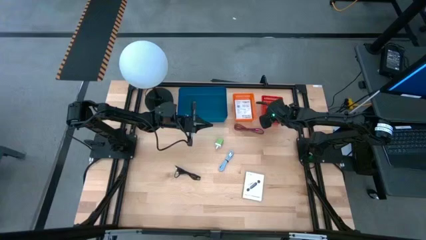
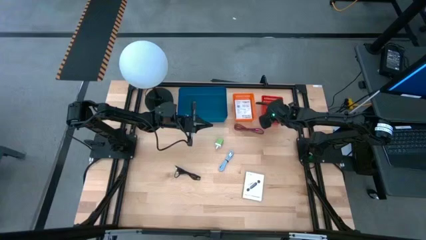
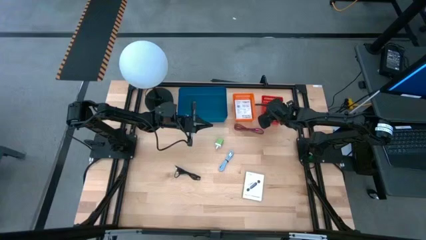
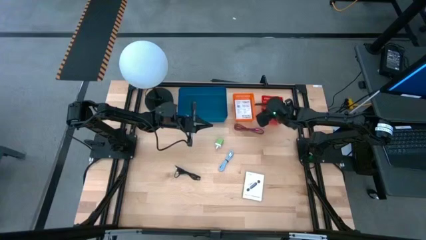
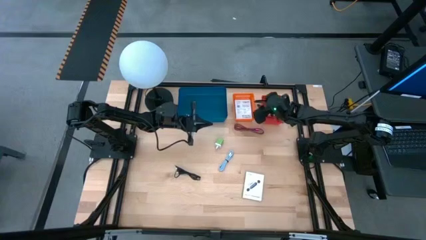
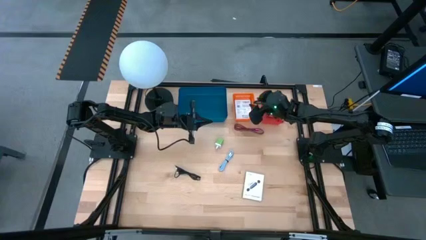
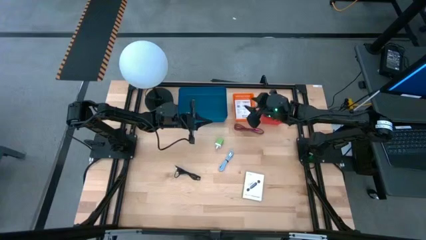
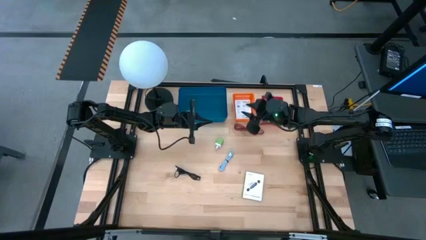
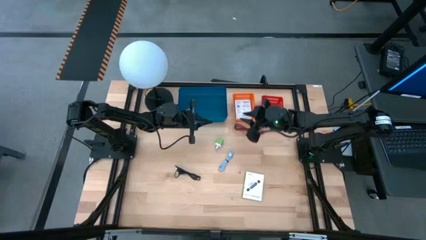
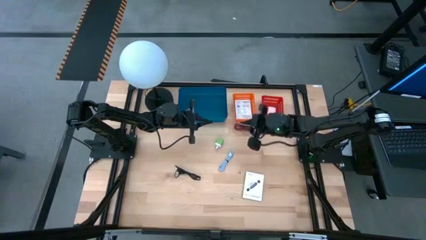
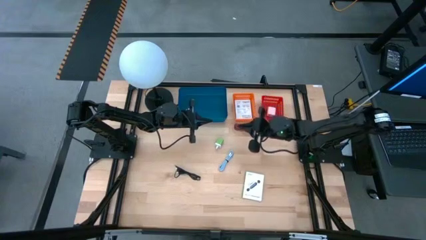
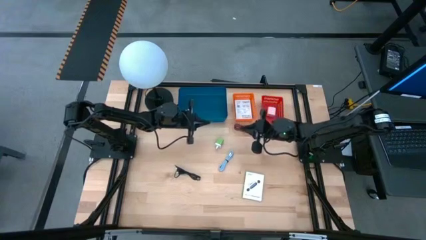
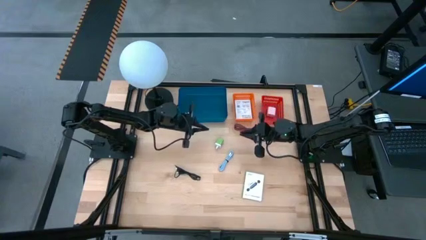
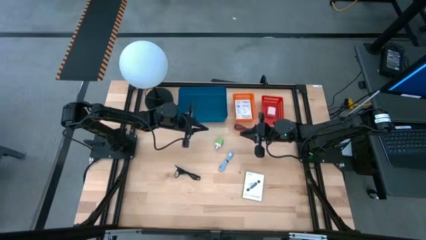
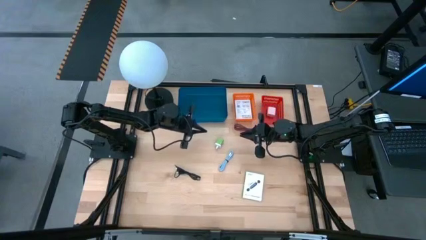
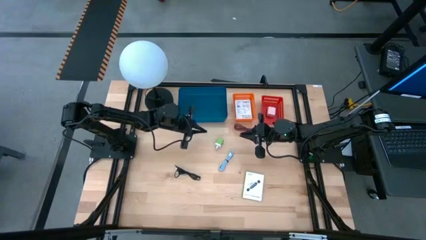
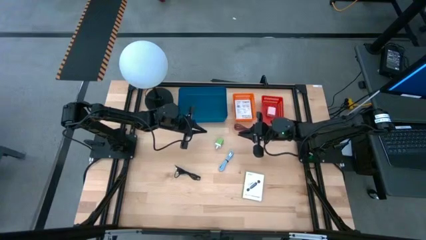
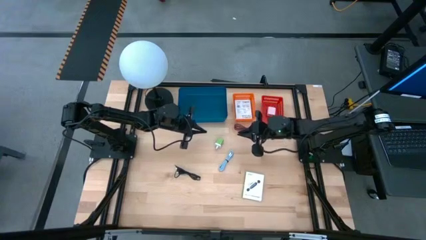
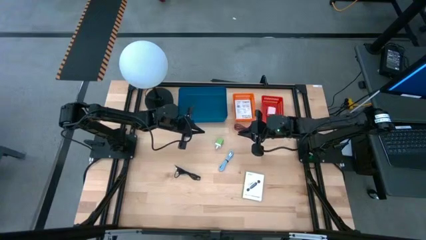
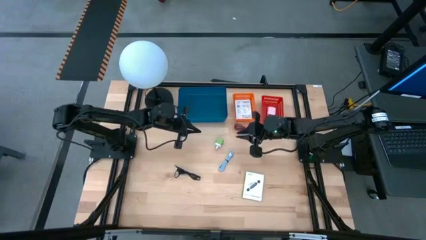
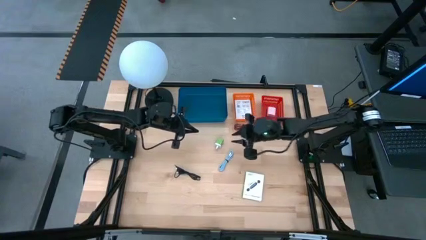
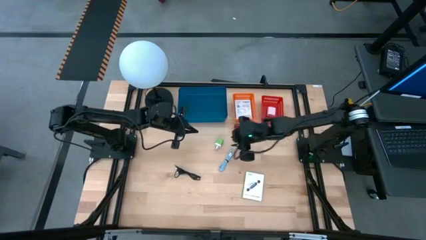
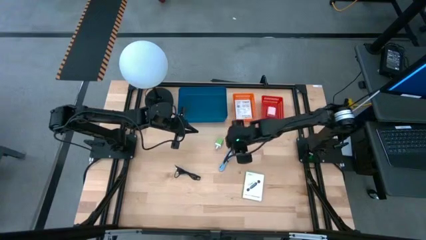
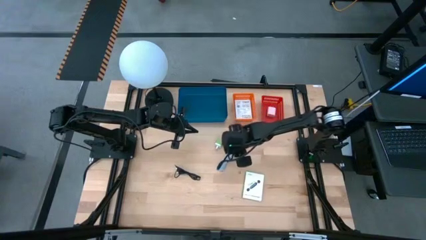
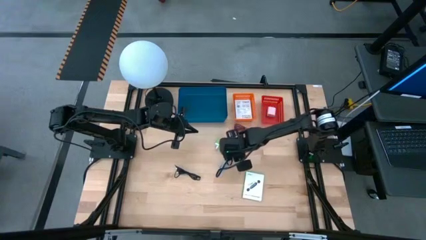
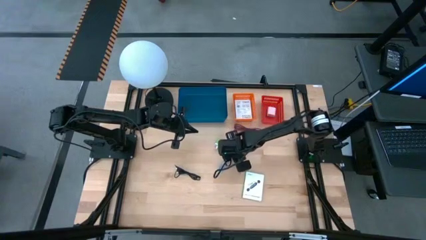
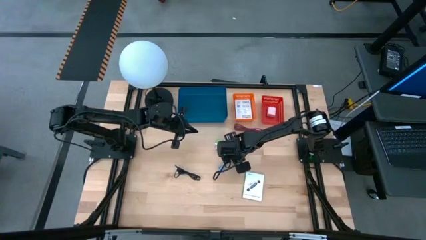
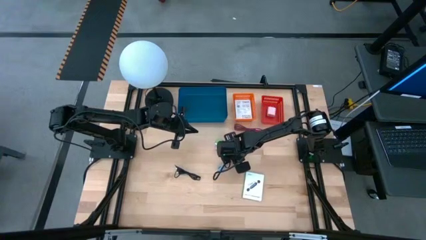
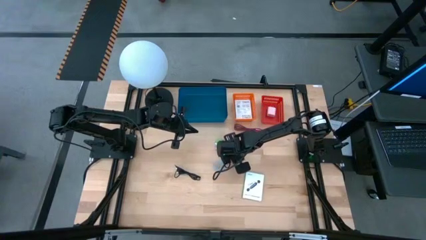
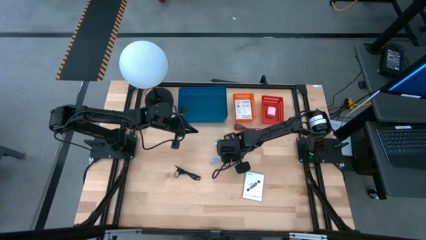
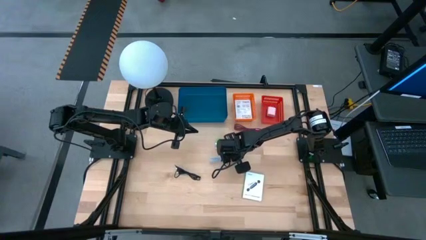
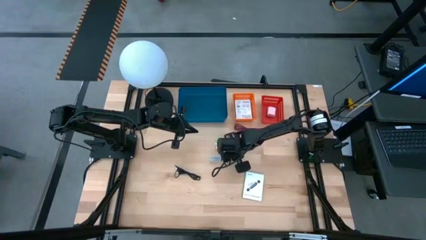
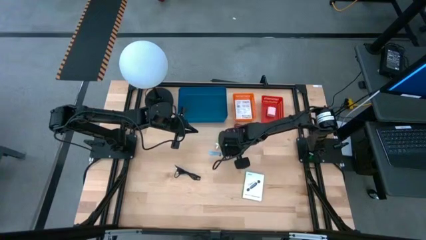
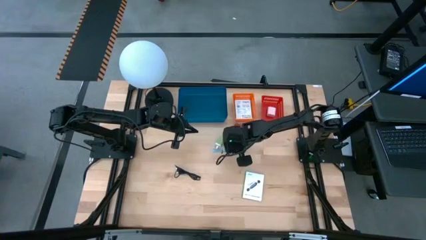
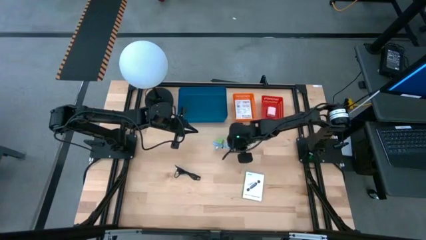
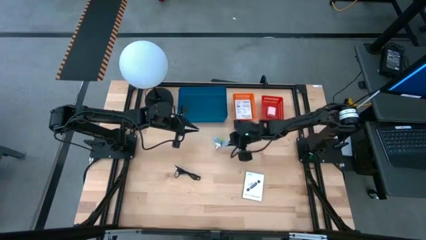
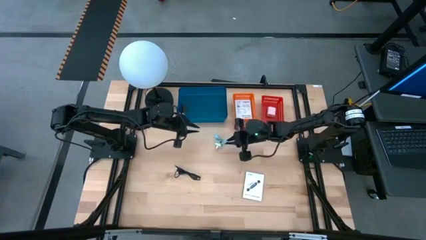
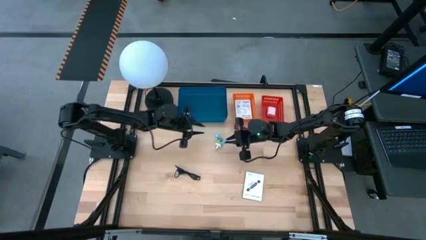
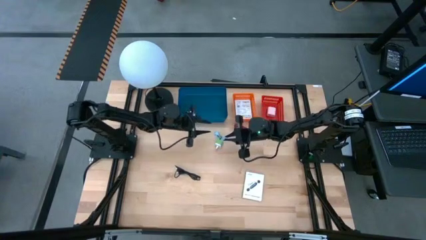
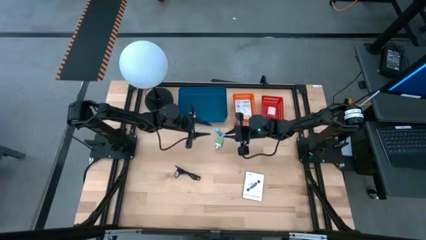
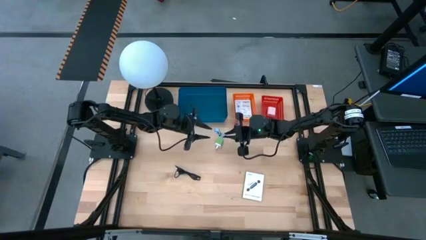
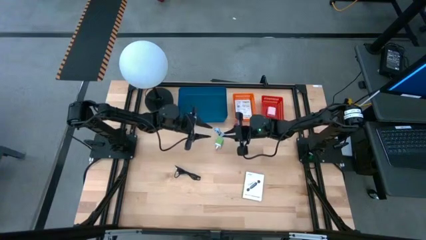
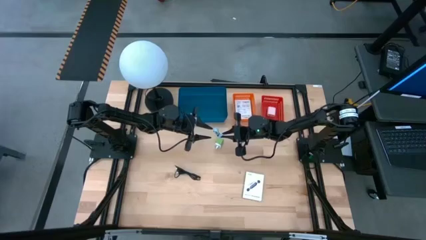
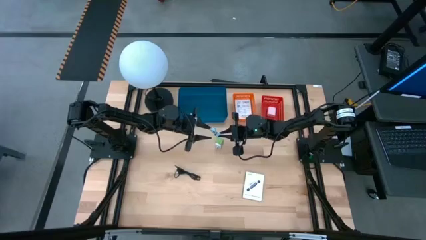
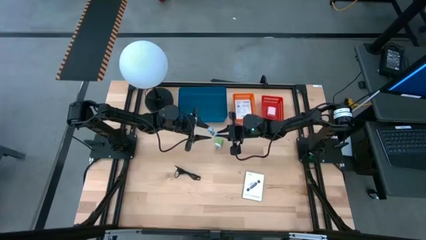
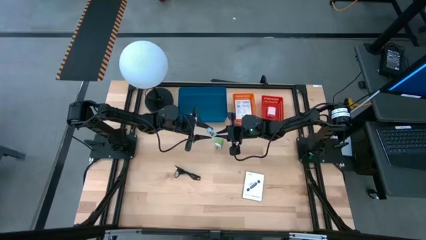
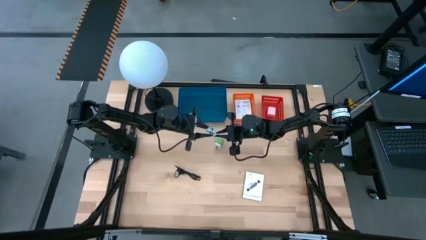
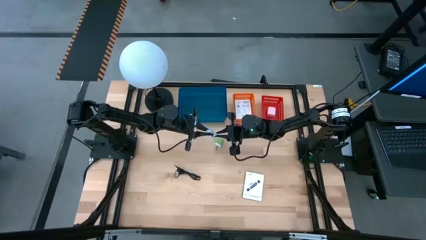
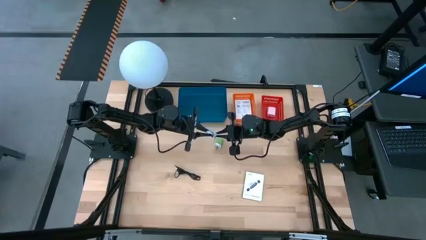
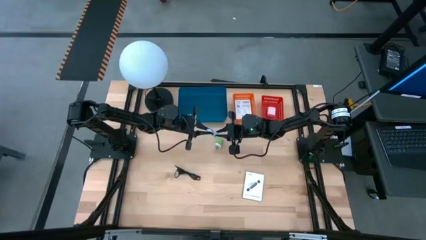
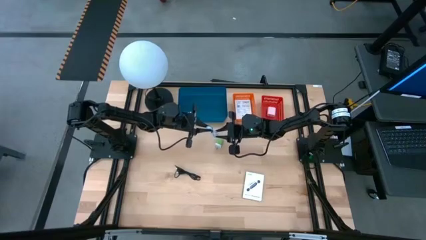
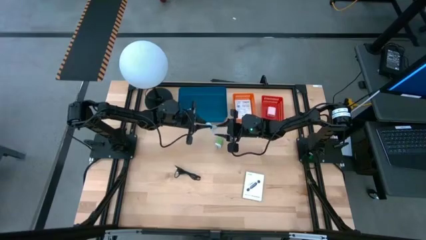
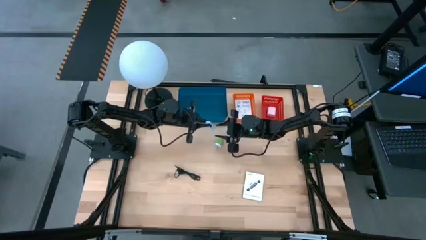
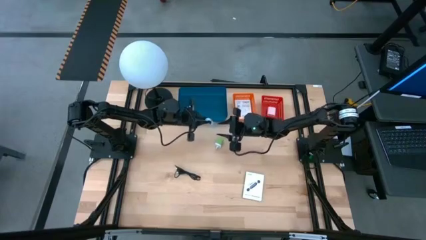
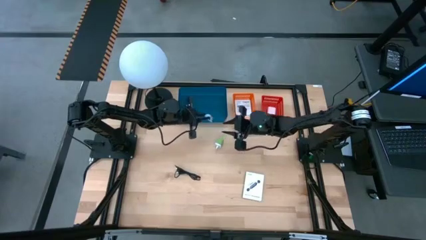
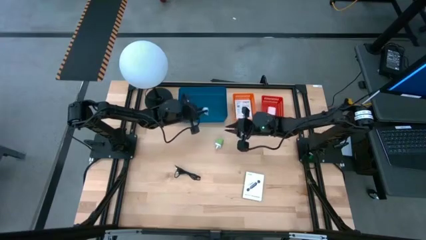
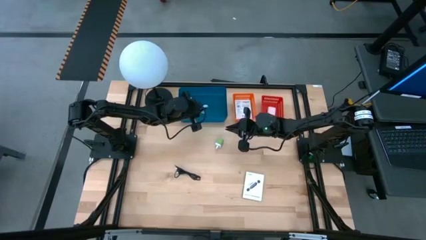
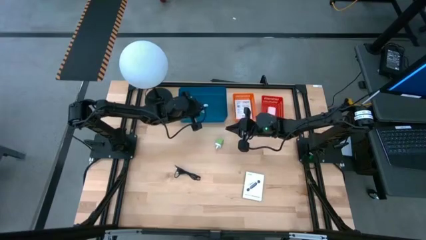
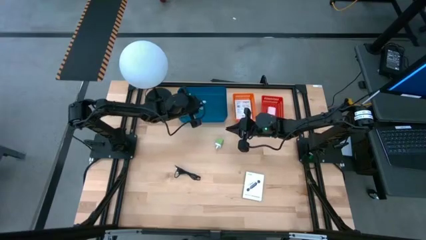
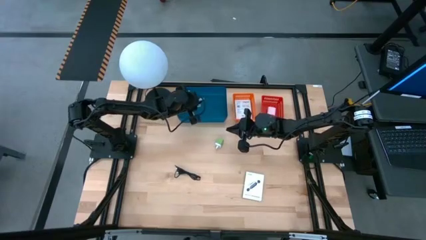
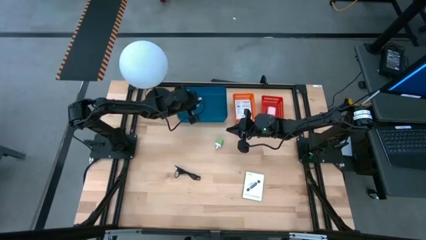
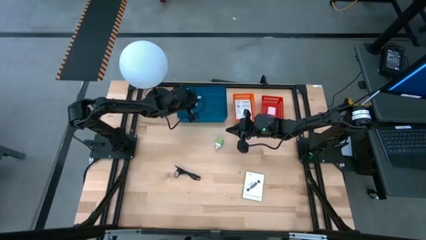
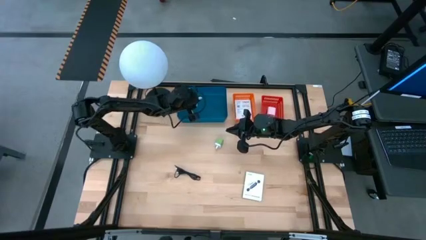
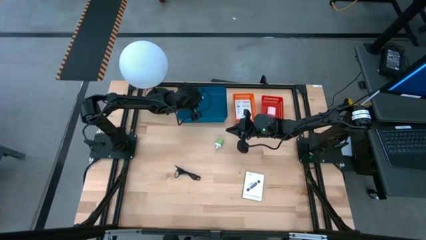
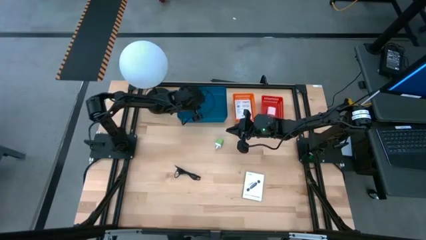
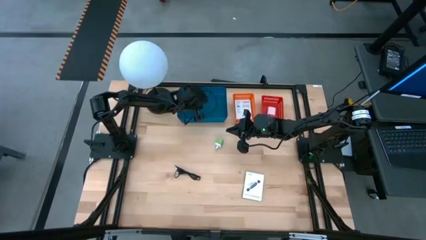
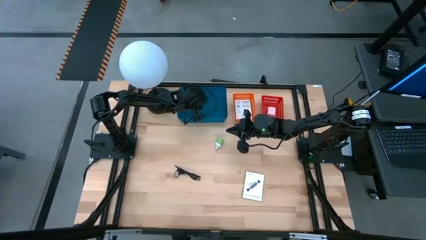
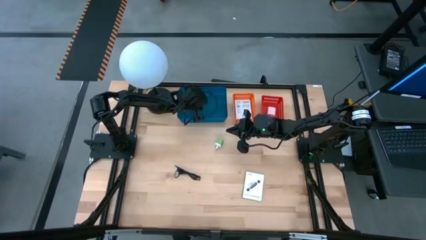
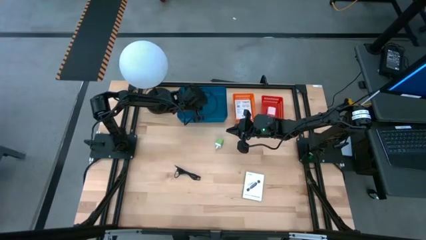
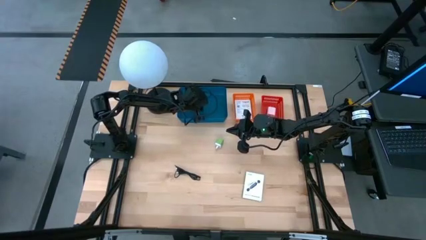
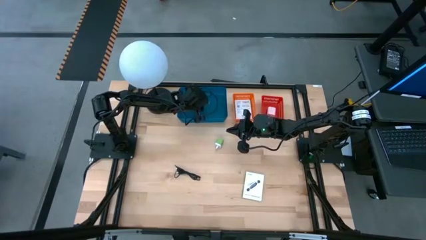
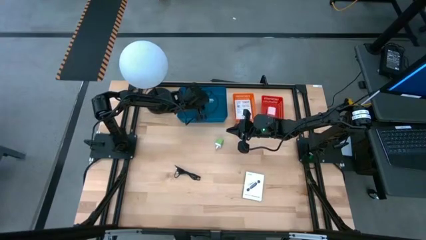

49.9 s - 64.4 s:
Task: Pick and place items into bin
Put the light blue charger cable into the blue bin

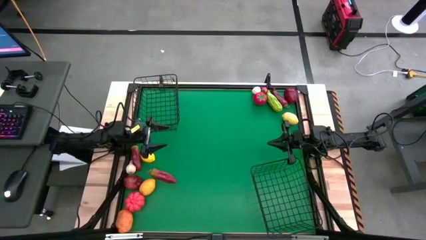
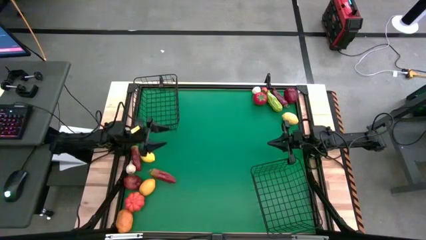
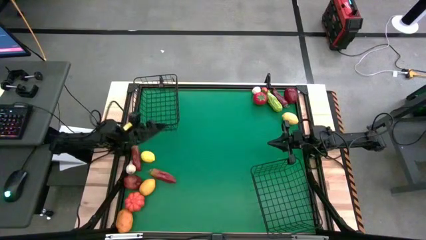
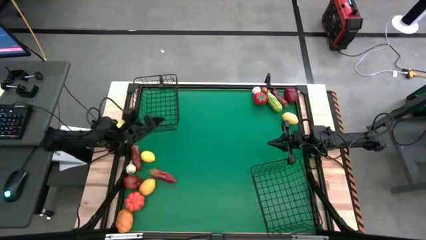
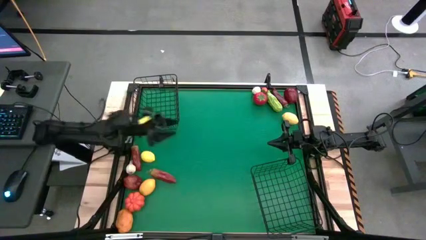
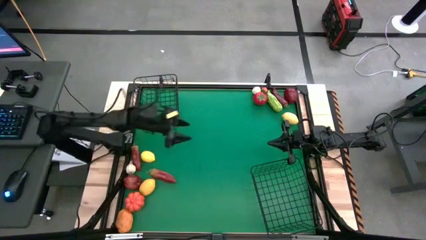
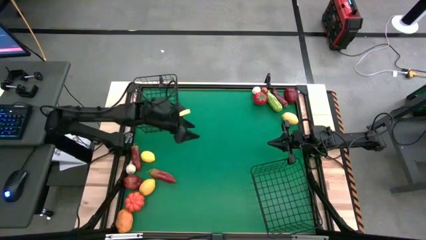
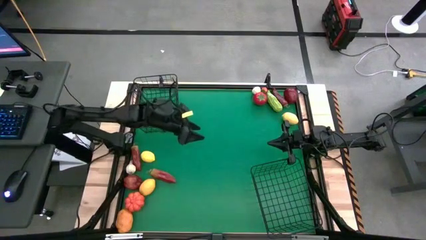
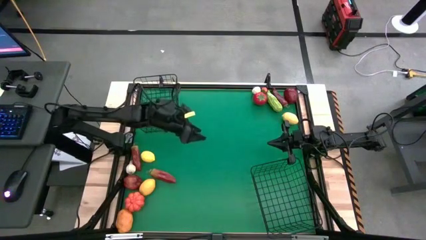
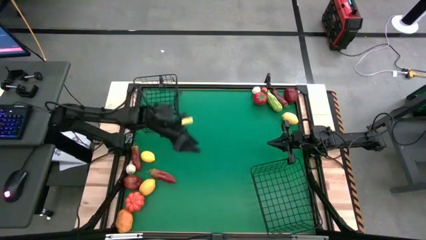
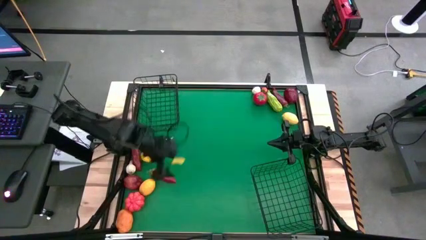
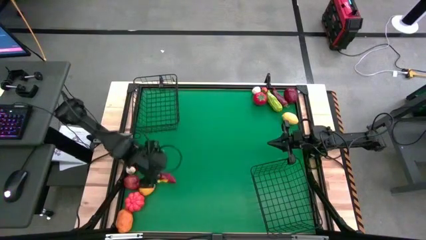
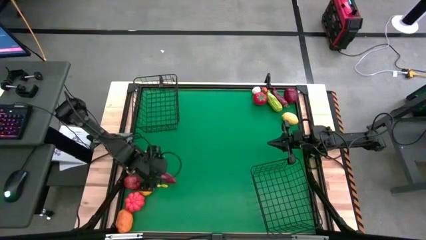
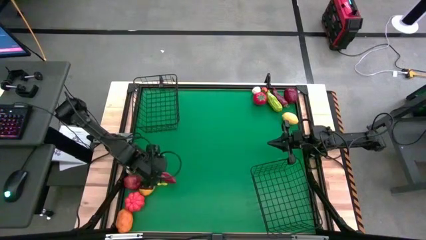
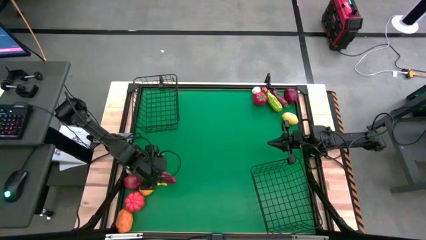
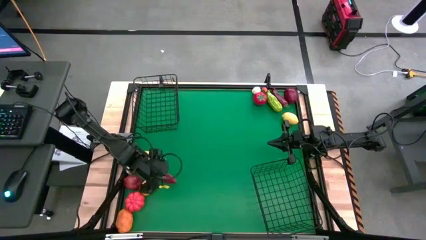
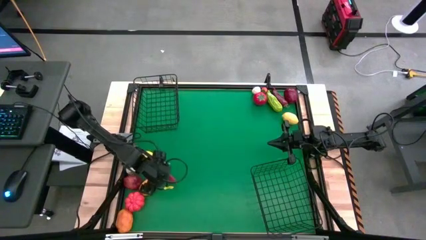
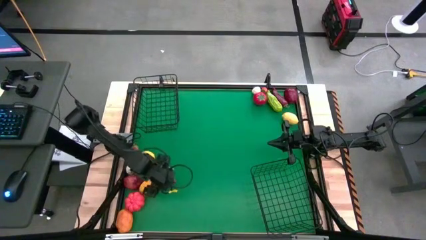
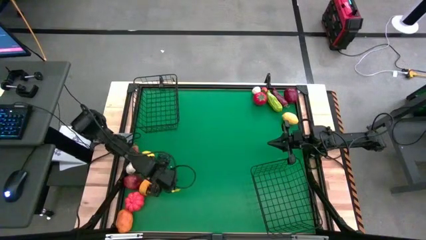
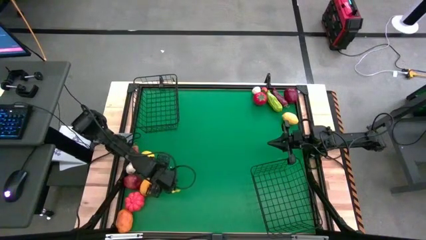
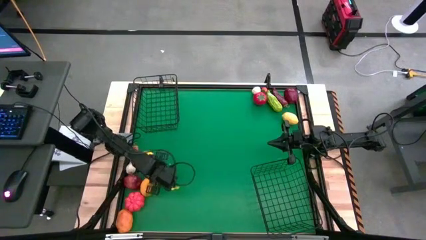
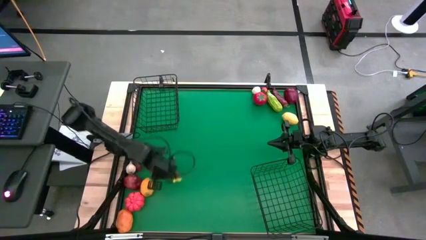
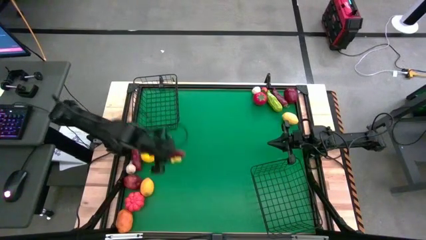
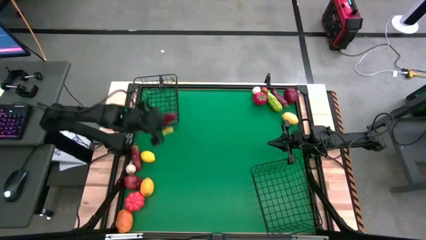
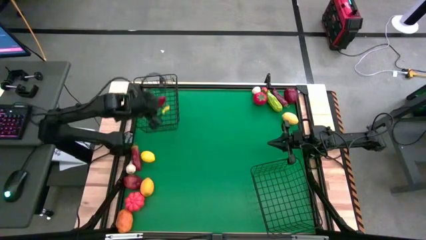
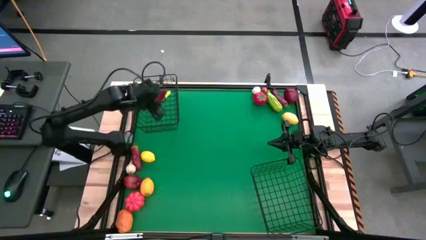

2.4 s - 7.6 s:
Task: Sort produce into baskets
Put the bottom red chili pepper into the top black wire basket
